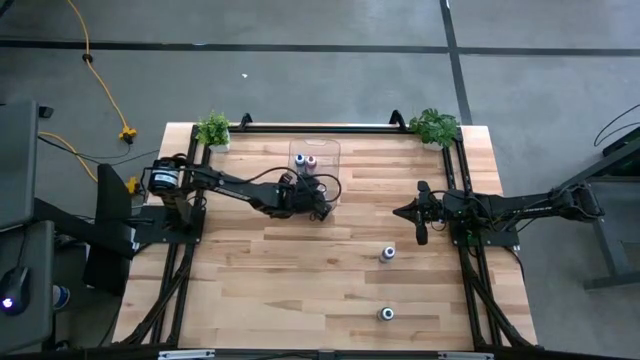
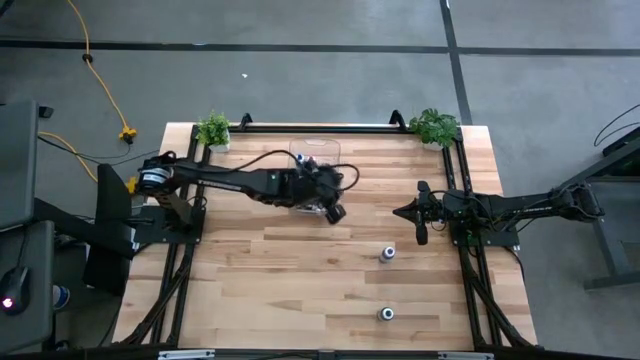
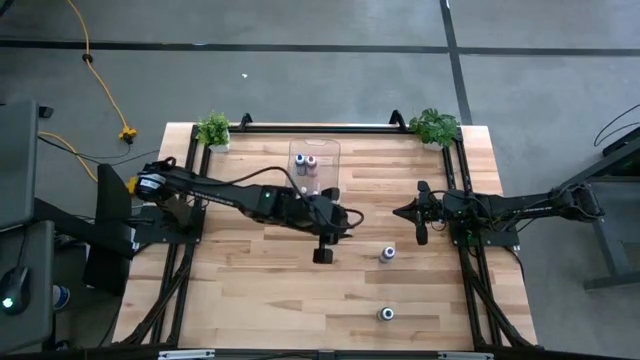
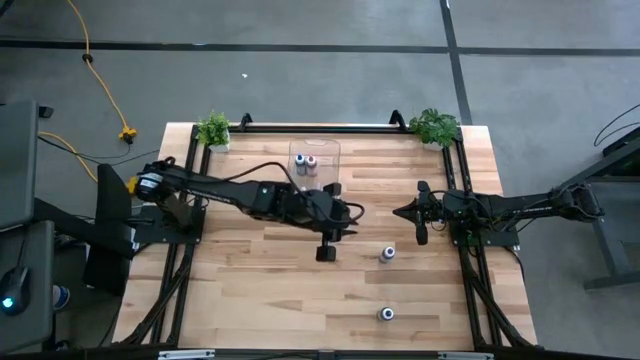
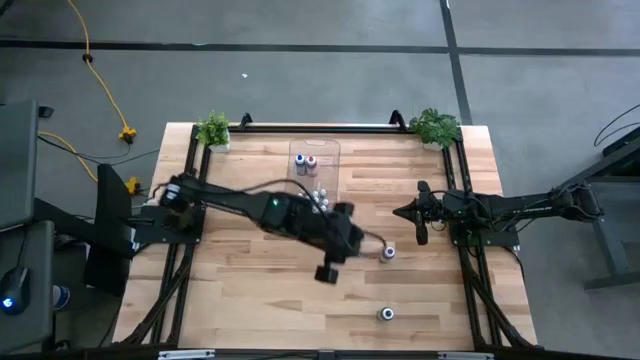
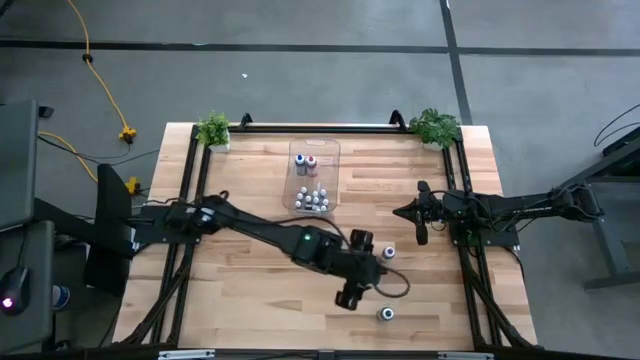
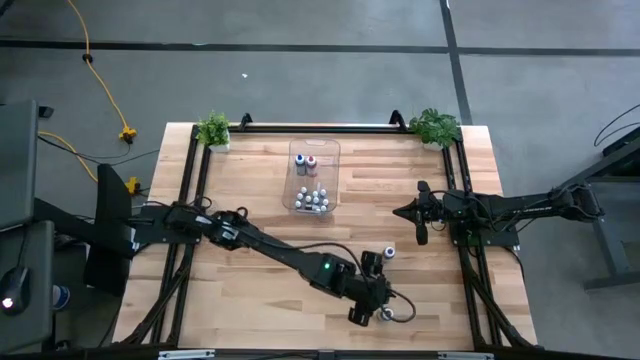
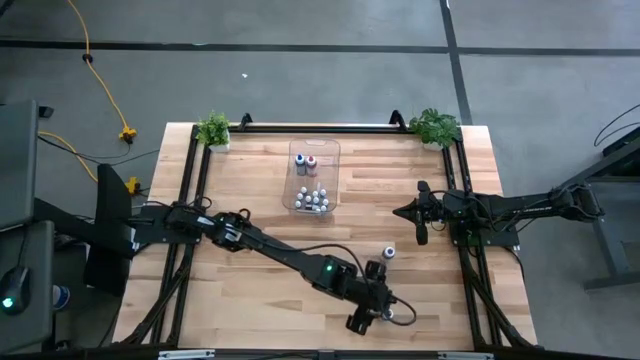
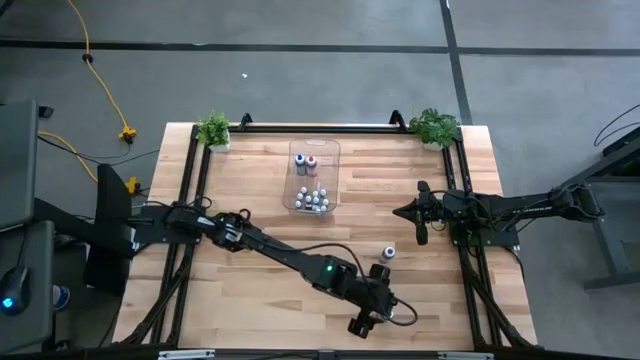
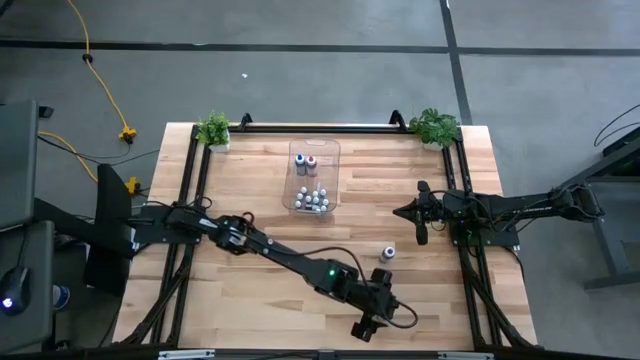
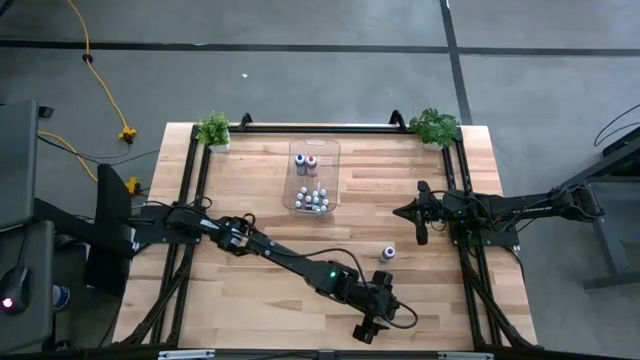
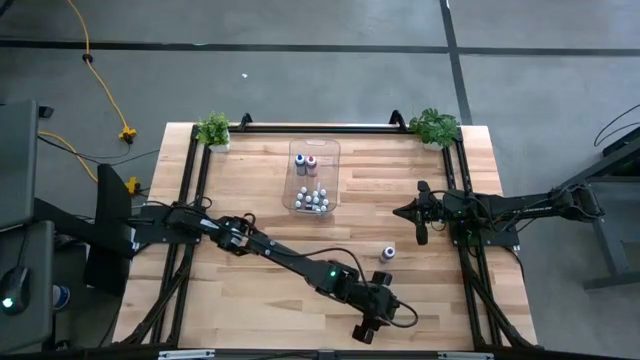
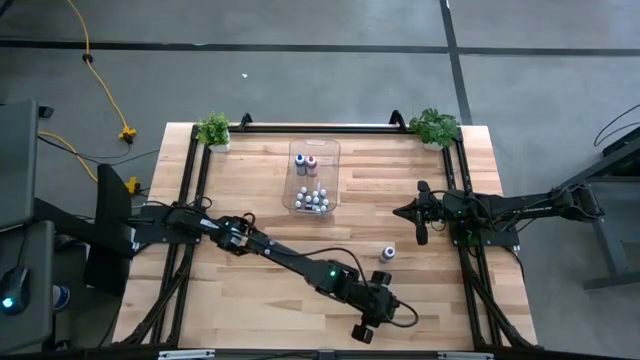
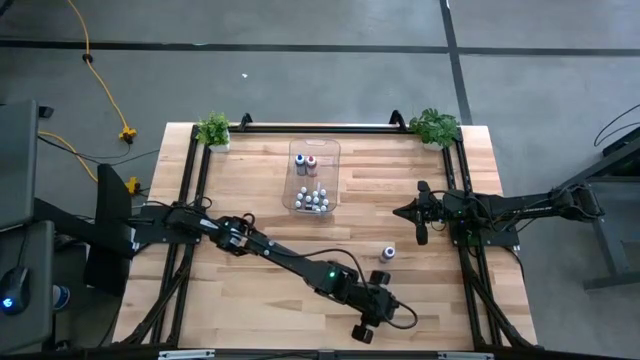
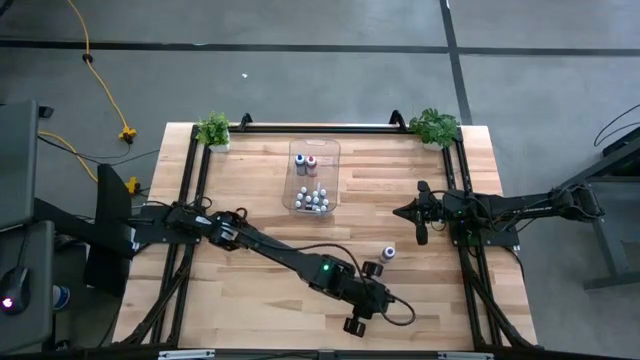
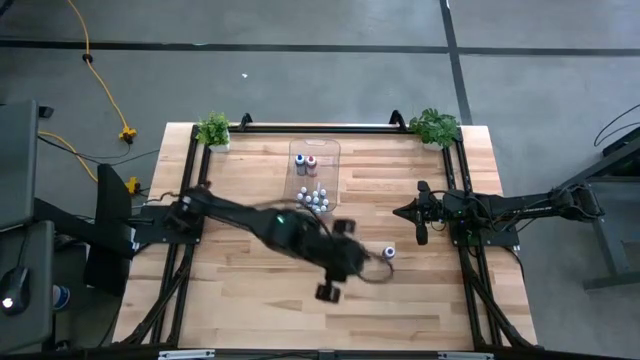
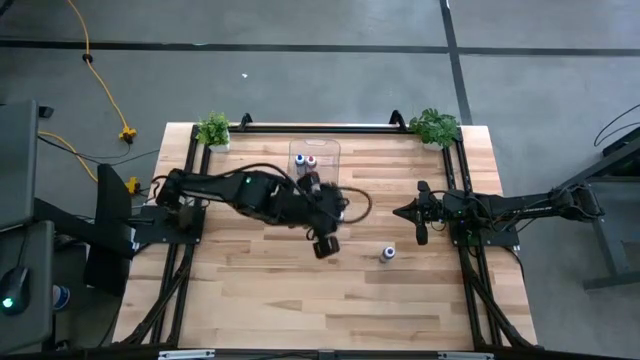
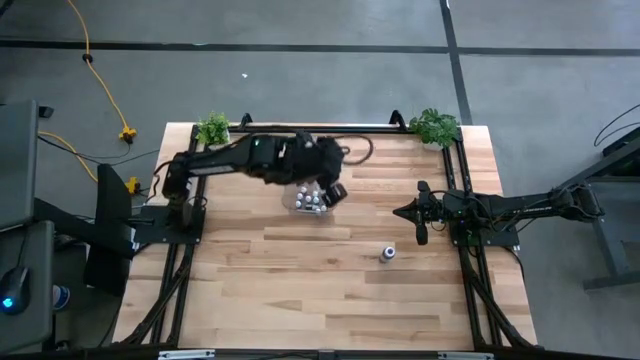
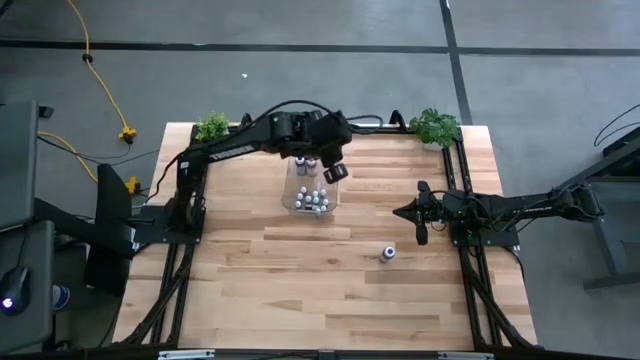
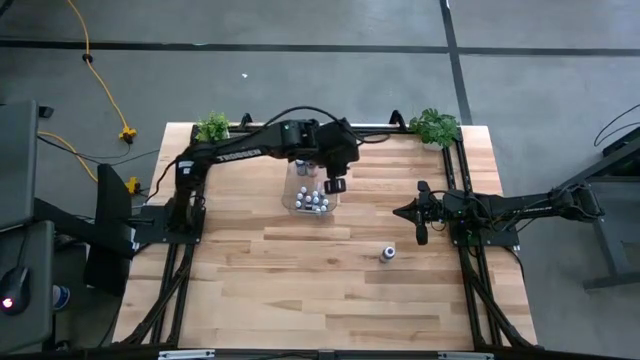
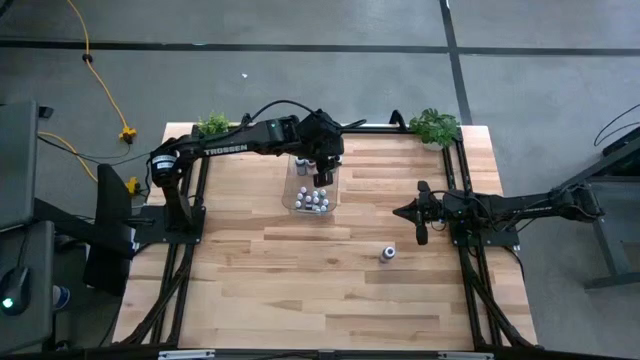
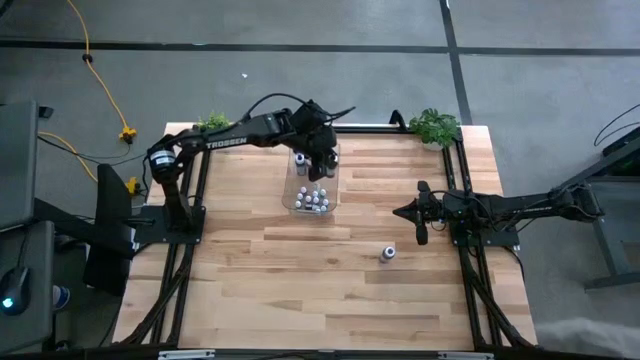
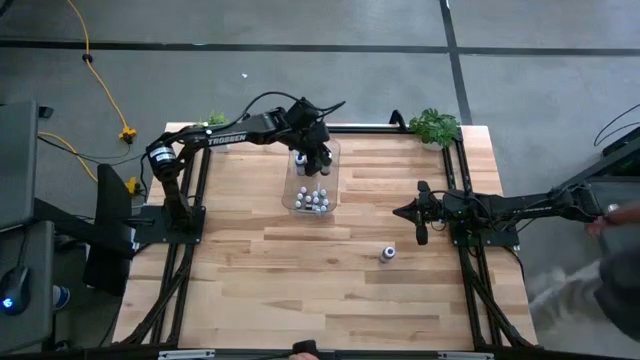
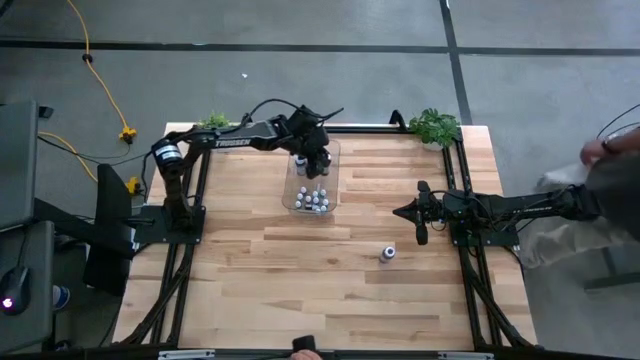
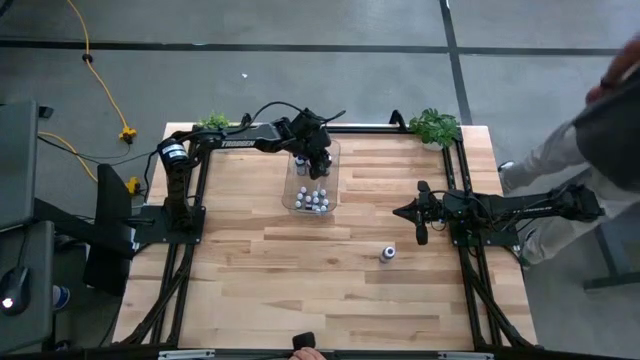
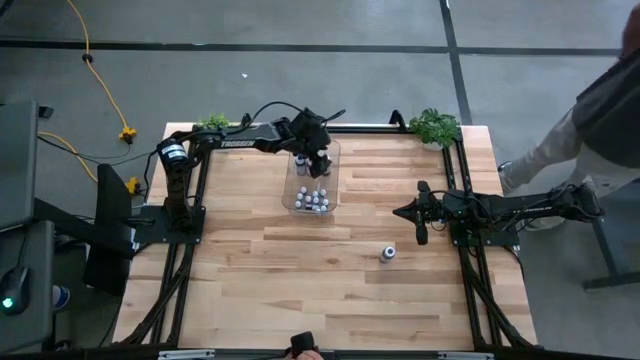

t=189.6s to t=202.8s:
Task: Pick & Place food coloring
Put the large black food coloring into the transparent bin

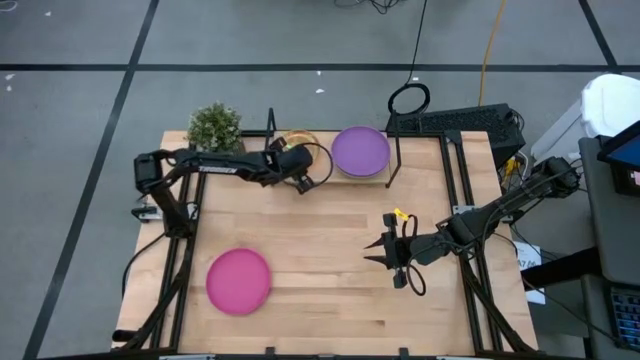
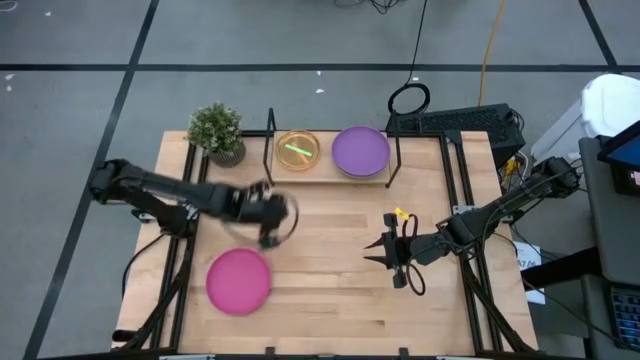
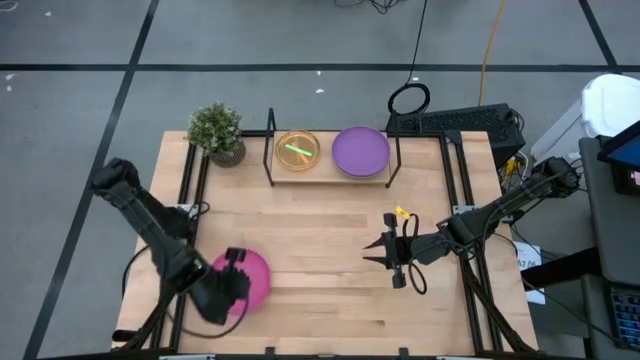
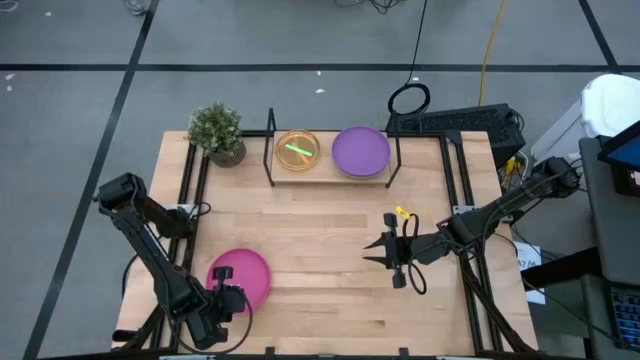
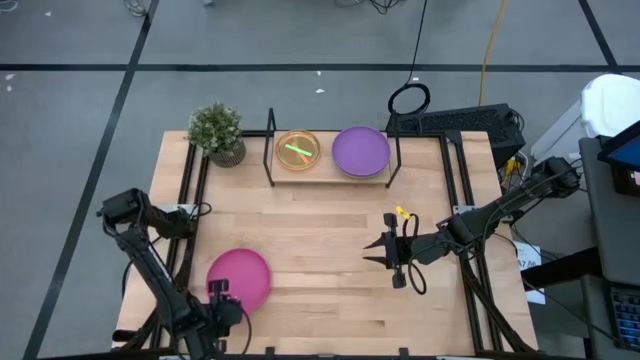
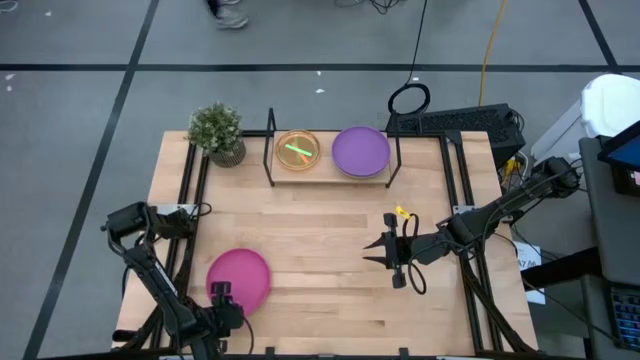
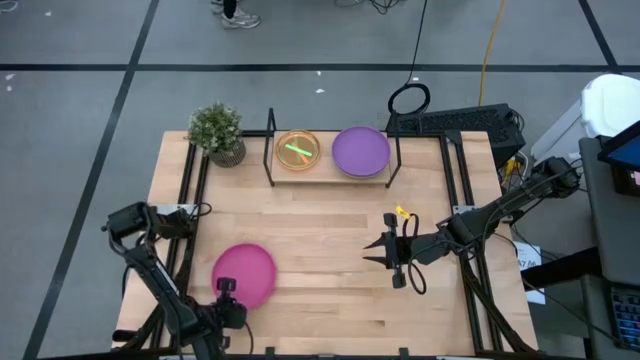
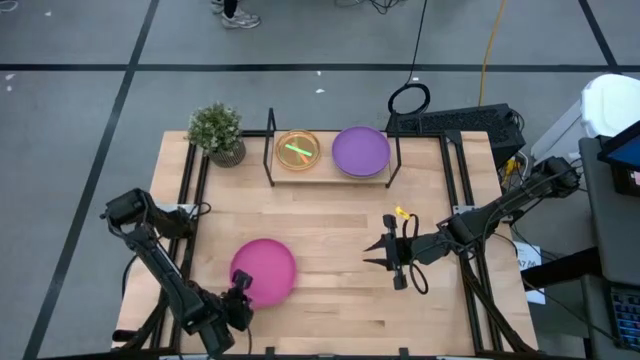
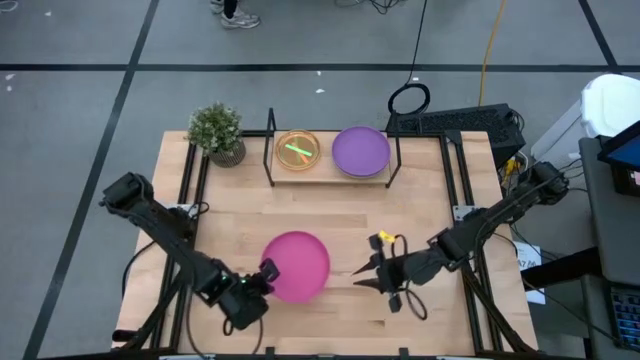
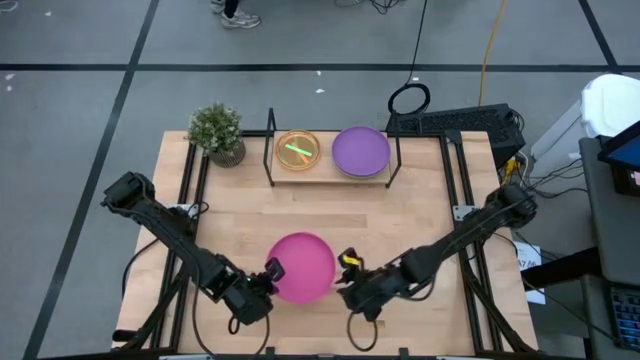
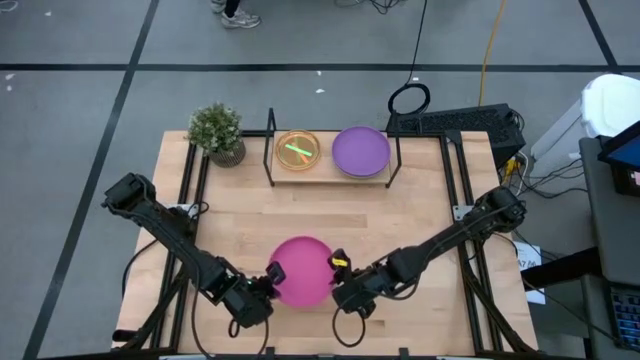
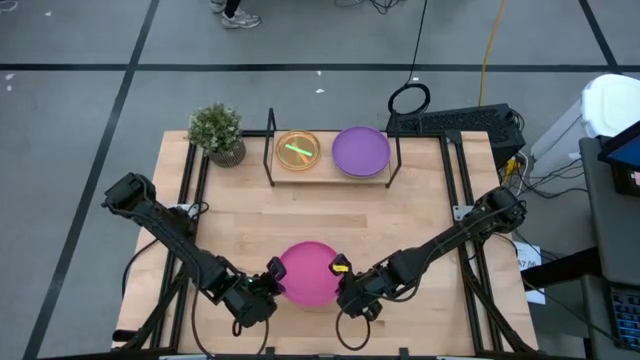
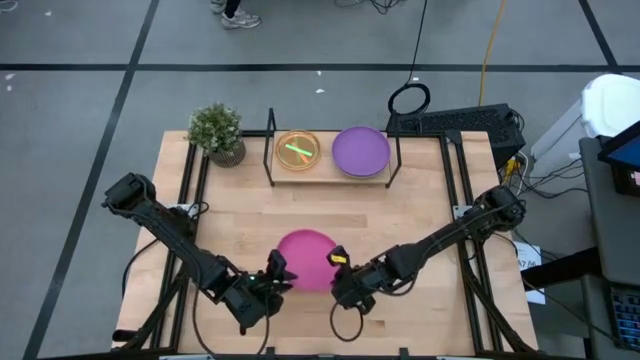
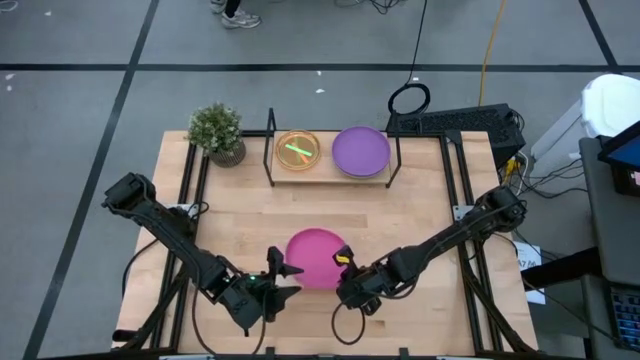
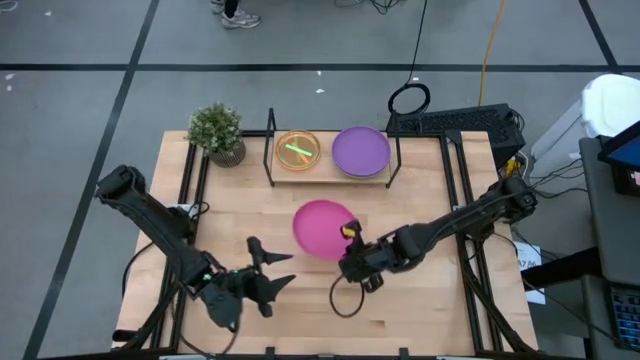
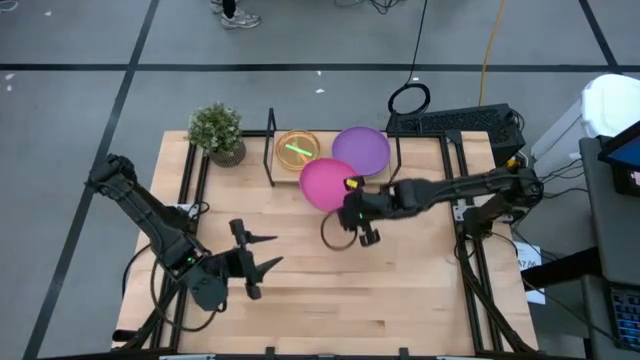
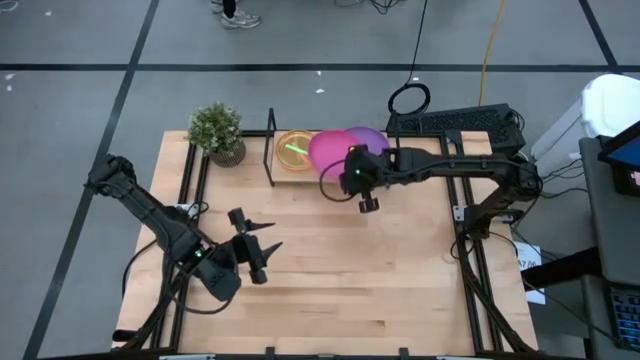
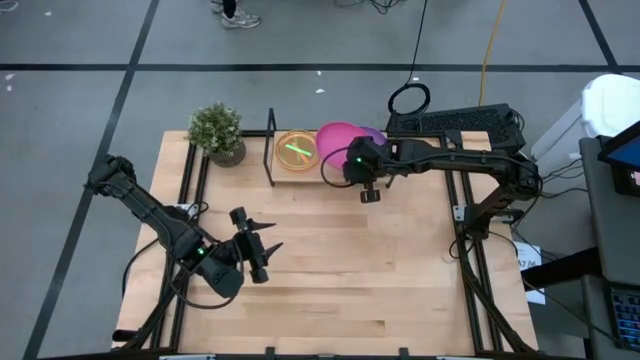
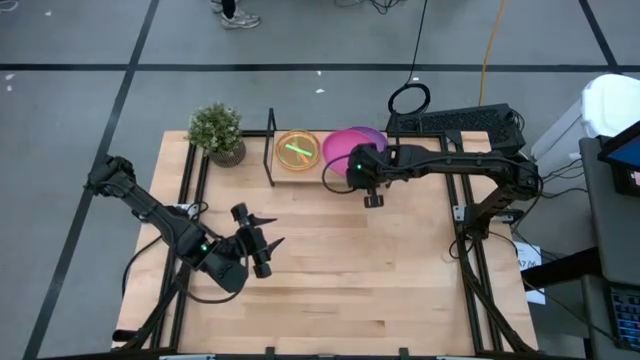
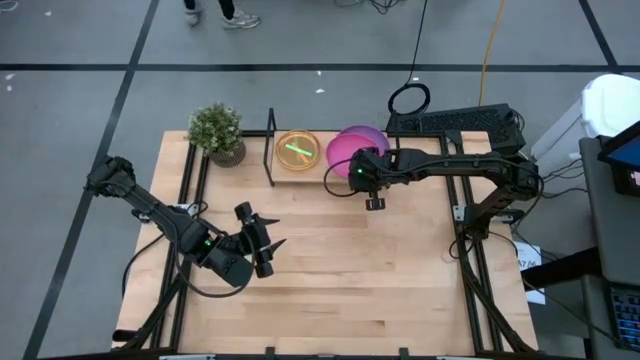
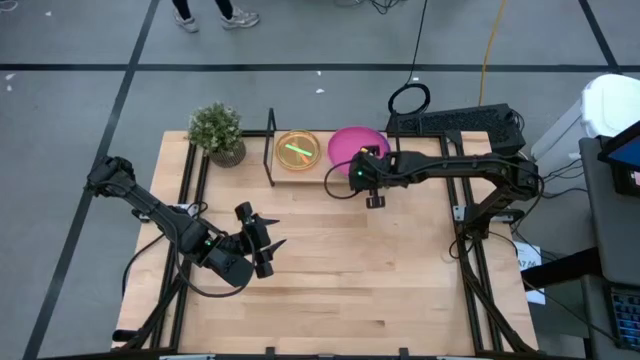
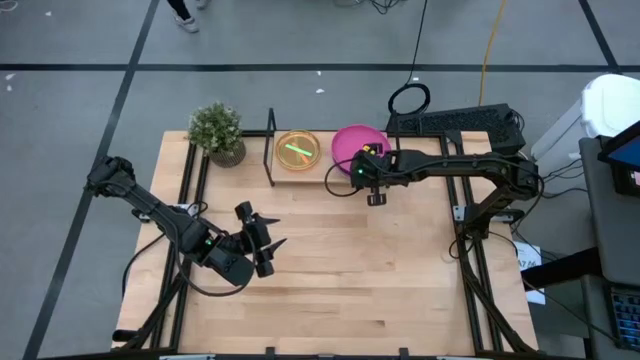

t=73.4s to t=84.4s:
Task: Place and stack plates onto a shelf
Stack the pink plate on top of the purple plate
